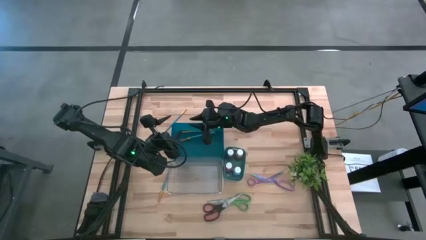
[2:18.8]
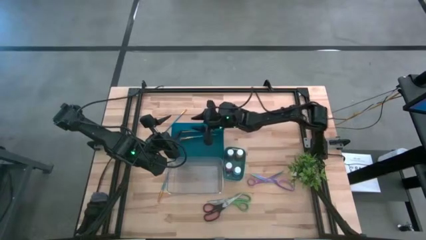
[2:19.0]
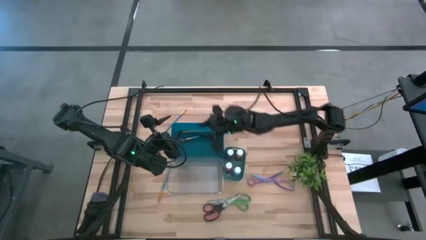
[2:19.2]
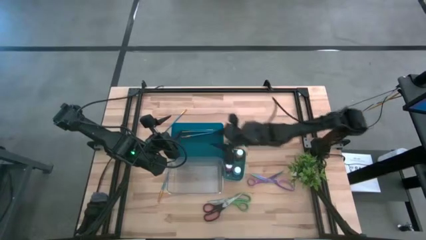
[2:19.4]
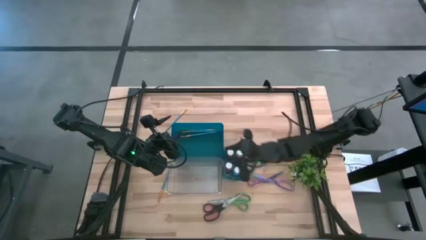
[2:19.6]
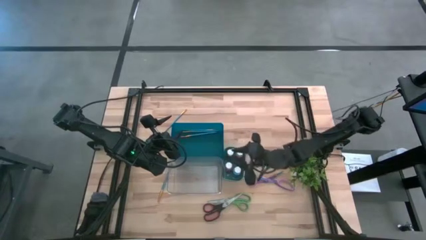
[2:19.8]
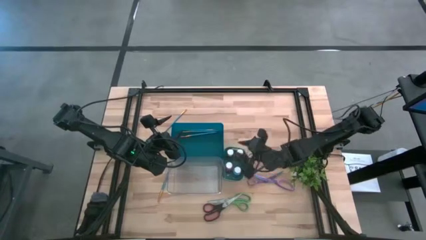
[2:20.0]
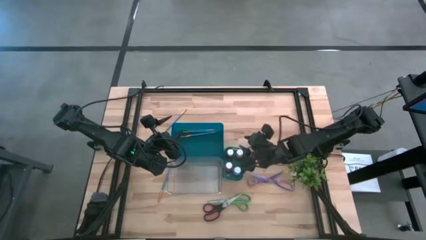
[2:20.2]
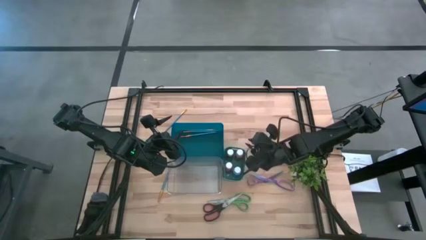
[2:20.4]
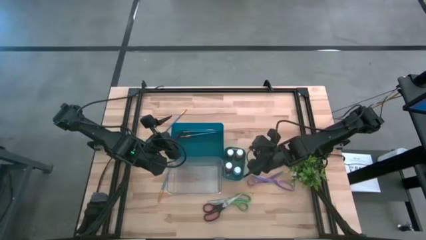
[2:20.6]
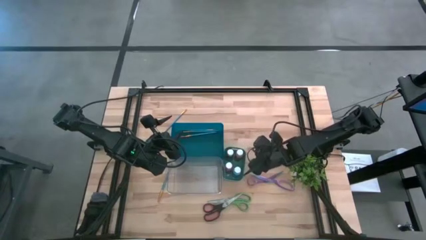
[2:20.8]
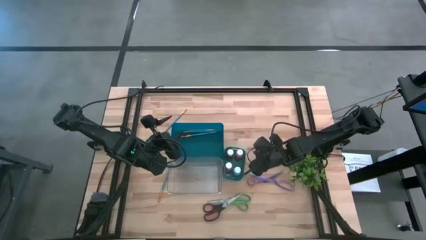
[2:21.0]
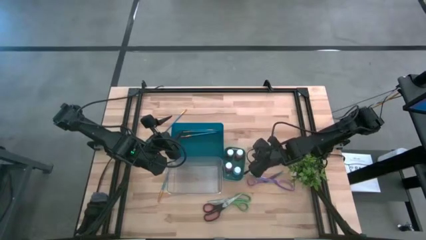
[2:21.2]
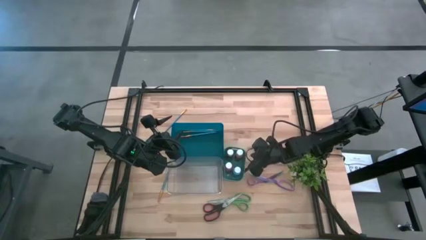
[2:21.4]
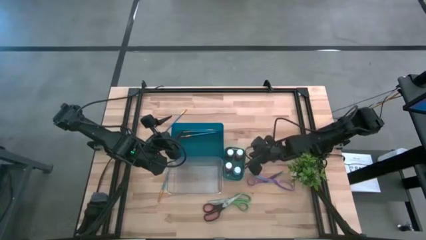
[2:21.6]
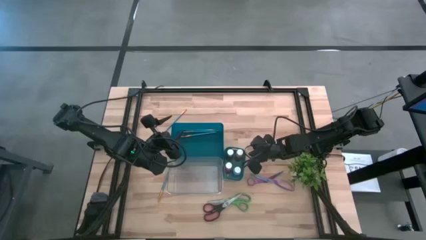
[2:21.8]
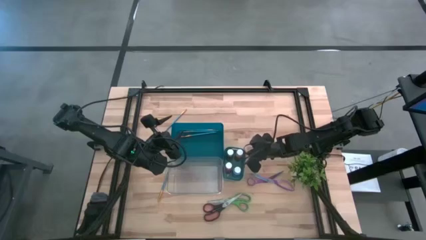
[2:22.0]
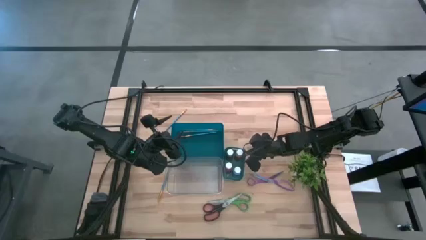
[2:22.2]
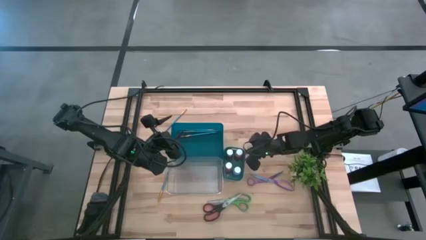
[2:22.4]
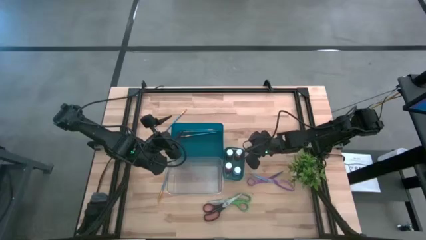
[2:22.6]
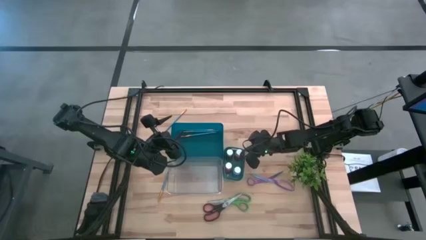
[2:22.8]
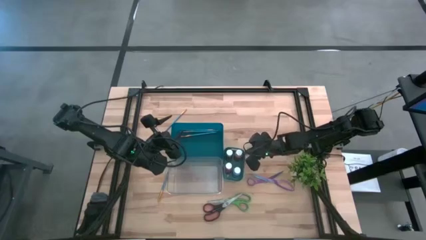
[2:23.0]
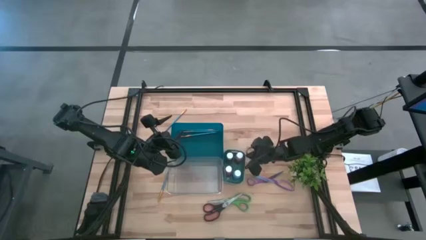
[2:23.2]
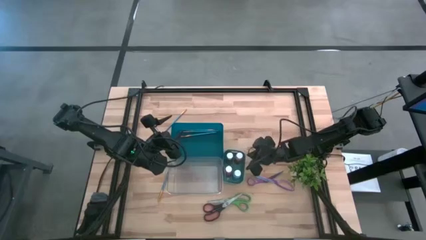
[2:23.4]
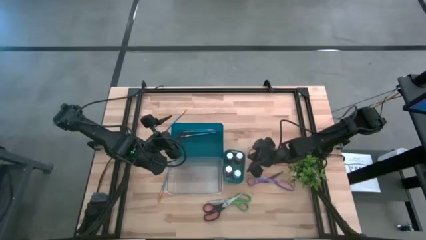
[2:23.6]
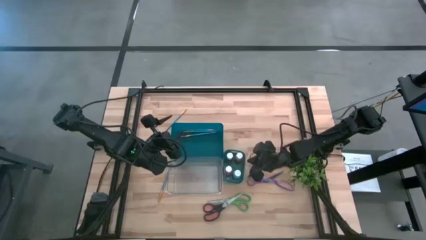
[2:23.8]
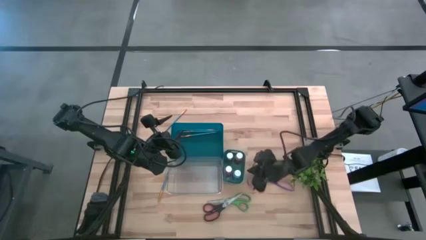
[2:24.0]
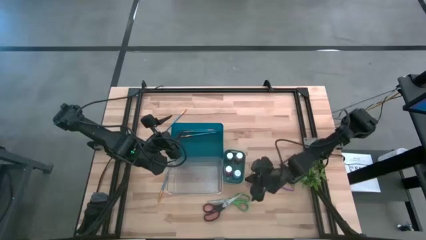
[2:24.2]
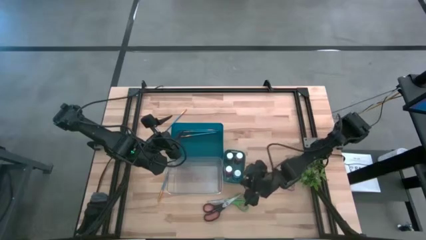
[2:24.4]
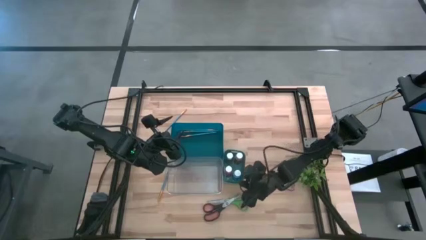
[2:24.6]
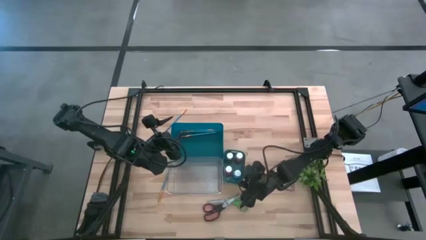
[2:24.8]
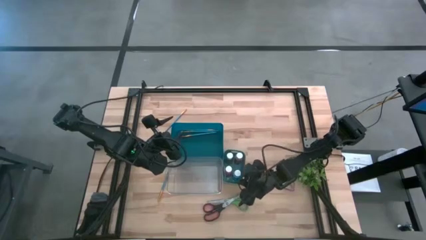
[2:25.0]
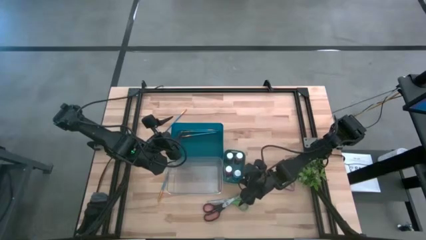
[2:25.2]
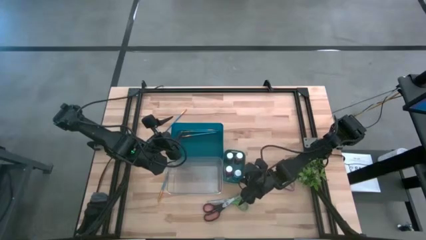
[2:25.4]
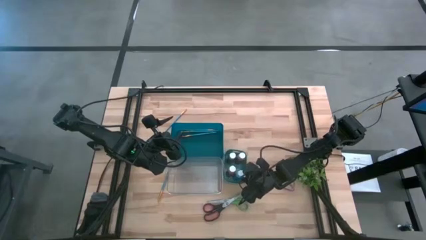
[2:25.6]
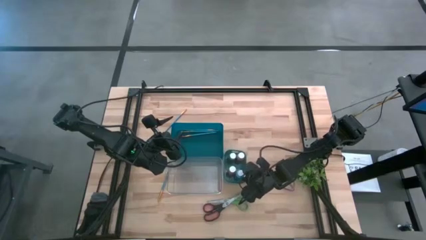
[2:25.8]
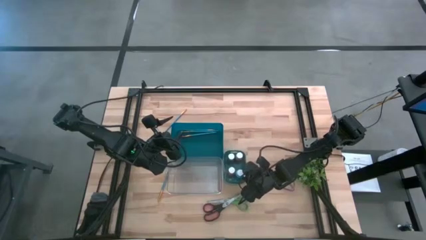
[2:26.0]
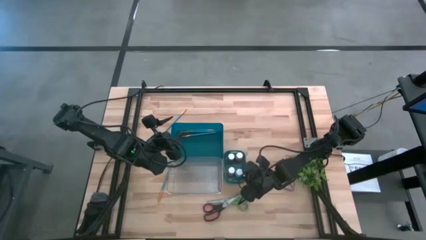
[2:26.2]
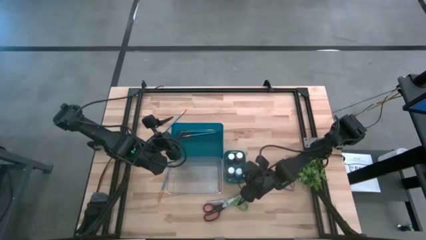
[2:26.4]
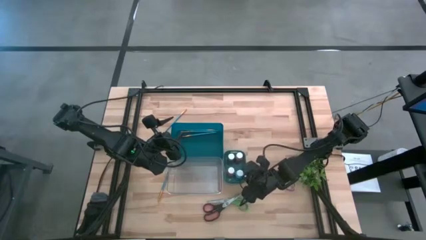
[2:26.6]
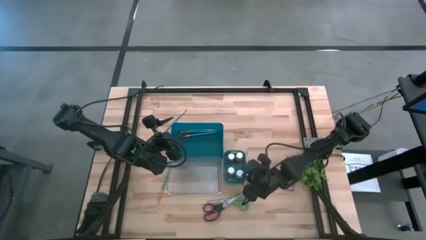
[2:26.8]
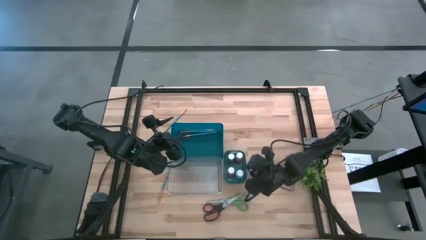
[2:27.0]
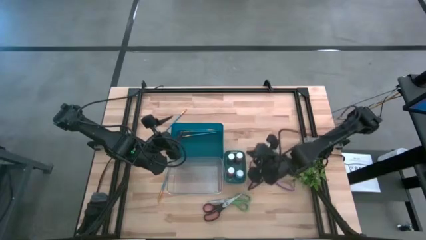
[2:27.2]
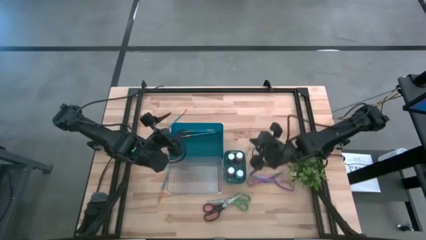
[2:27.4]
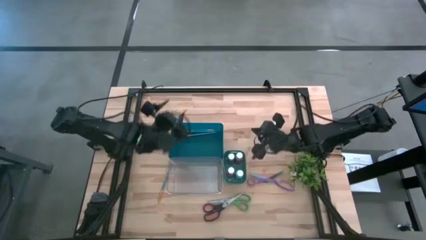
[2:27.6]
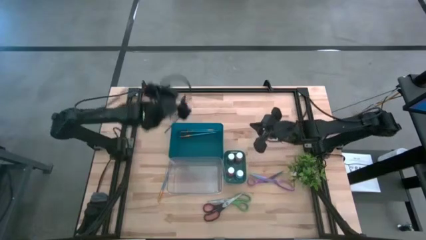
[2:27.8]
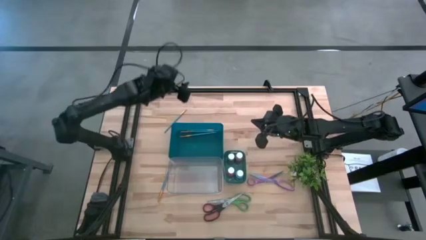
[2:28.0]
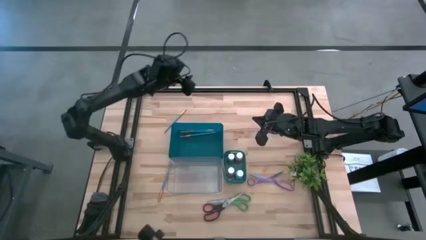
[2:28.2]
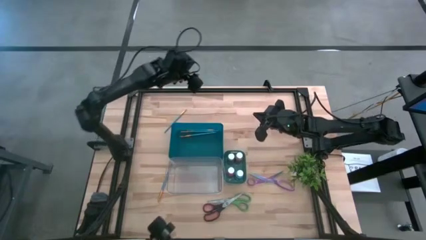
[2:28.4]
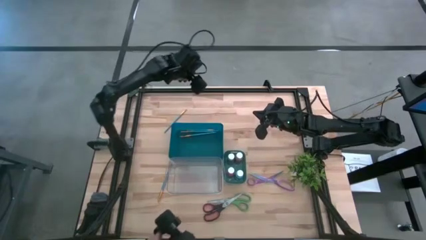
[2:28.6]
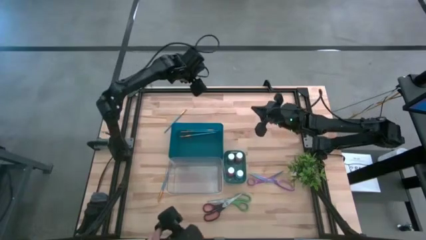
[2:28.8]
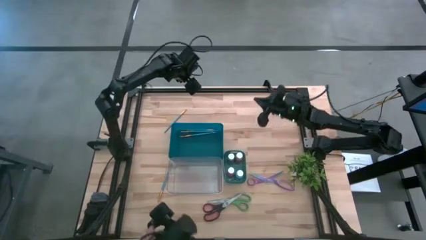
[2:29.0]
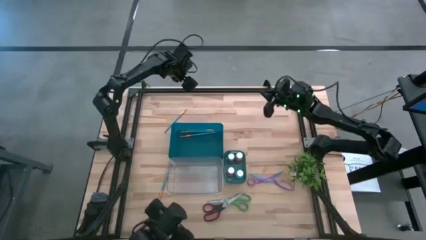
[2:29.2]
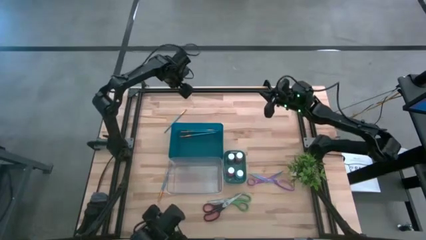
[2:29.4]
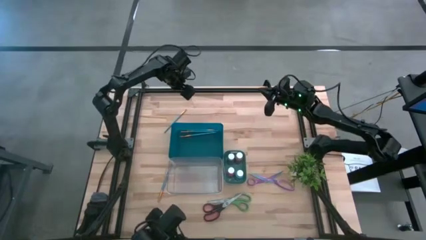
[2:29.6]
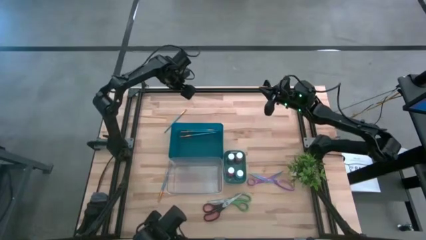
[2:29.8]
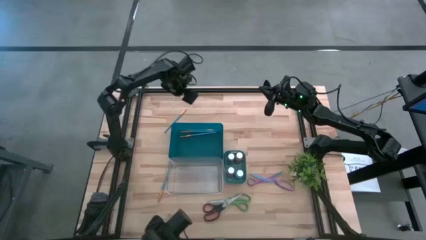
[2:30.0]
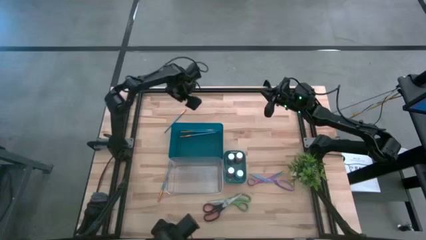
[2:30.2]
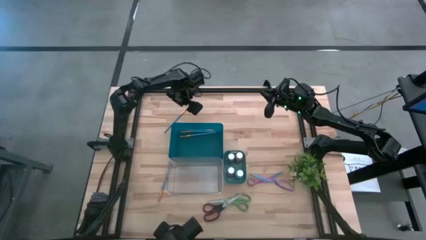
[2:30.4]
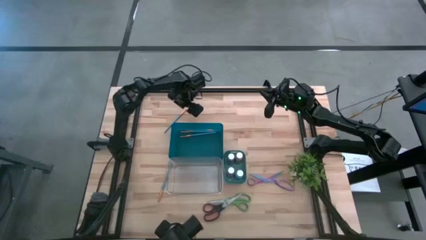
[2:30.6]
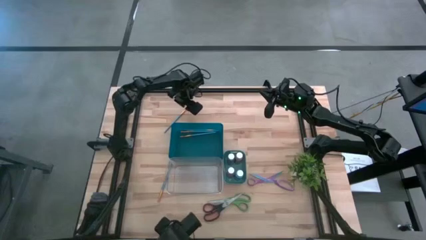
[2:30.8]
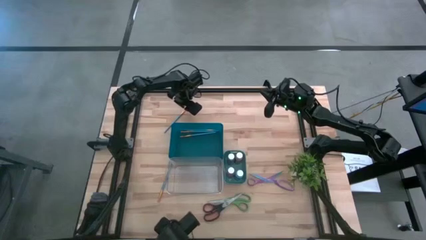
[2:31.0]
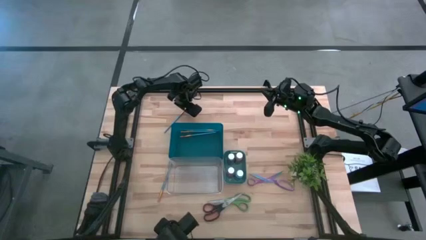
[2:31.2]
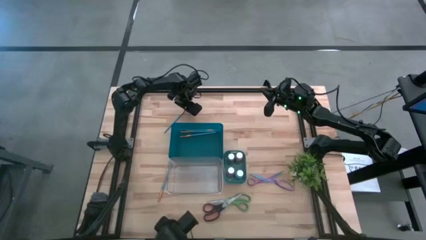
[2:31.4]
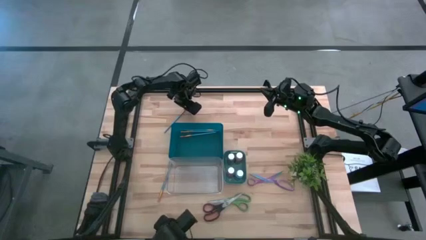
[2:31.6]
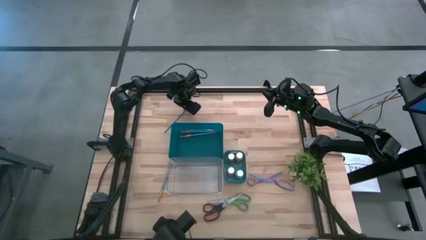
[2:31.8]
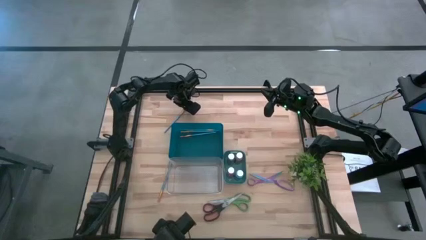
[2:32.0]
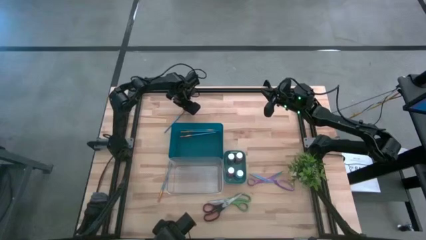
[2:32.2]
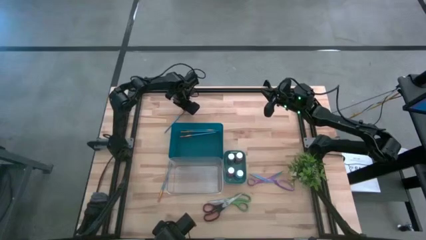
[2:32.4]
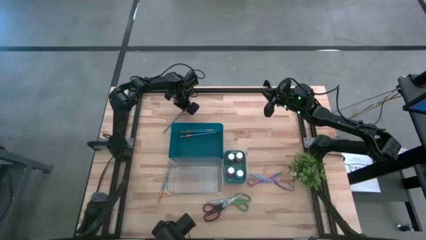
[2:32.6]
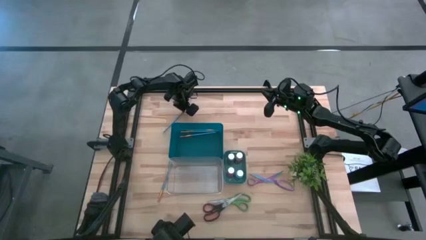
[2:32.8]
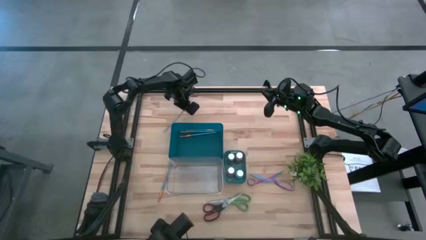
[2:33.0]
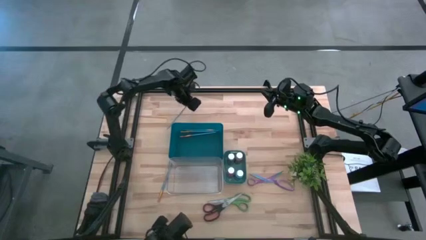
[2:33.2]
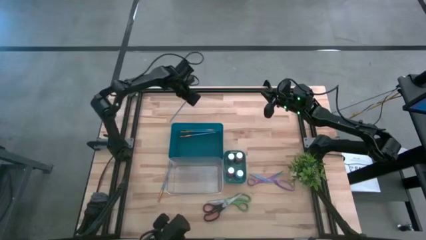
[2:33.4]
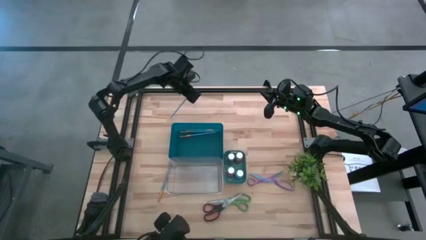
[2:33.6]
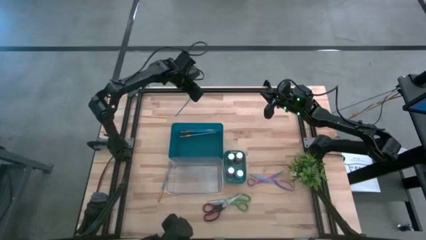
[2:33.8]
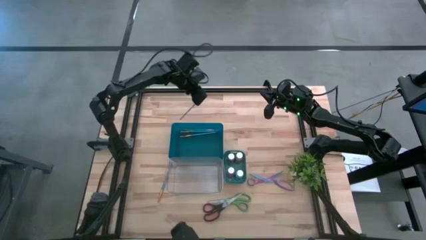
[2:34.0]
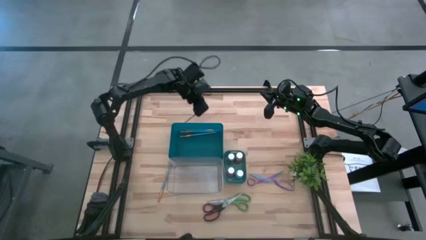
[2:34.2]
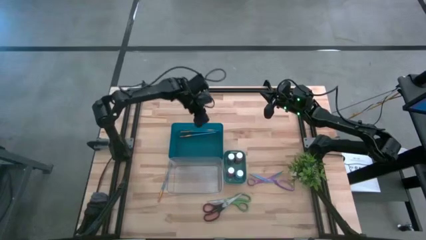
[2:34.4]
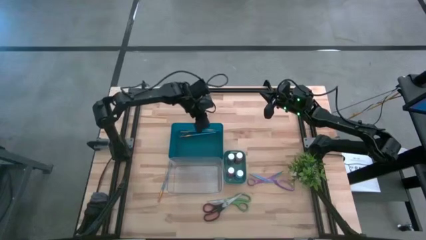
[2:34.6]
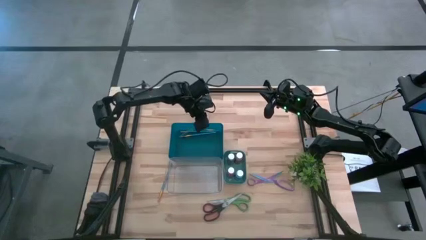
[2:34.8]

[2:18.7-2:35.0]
Task: Pick & Place Paint Supplies
Put the blue paint brush into the blue bin
